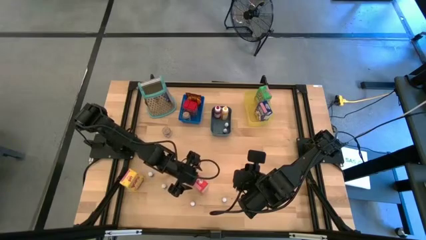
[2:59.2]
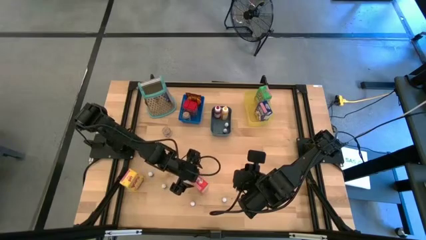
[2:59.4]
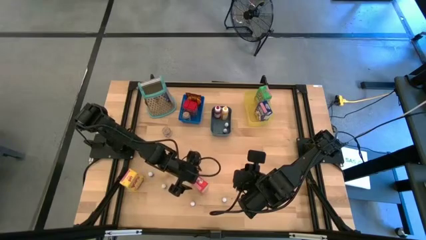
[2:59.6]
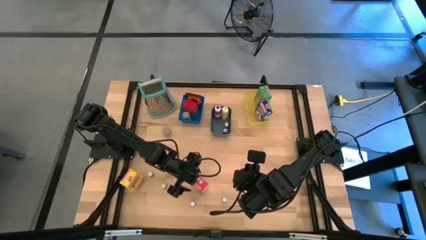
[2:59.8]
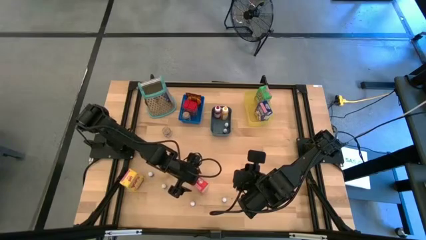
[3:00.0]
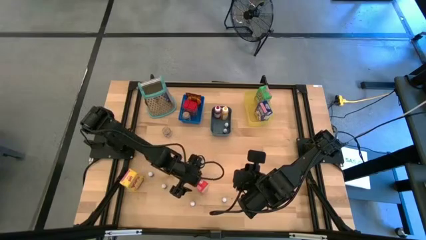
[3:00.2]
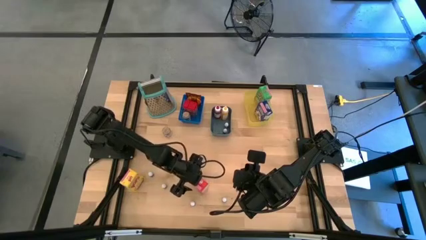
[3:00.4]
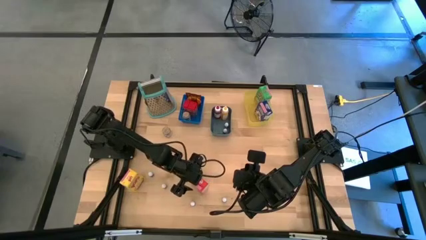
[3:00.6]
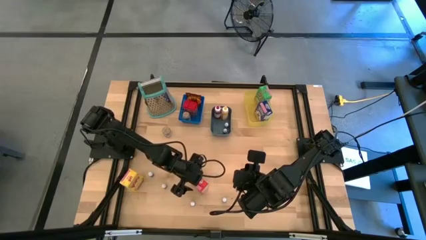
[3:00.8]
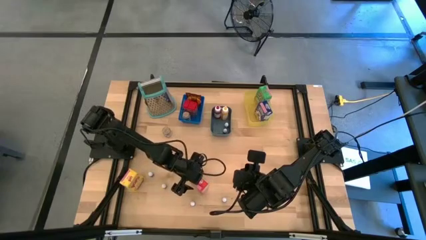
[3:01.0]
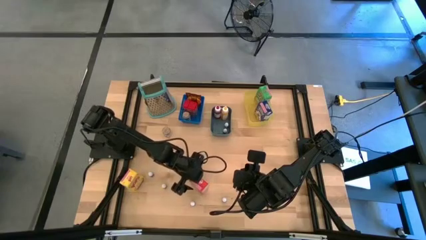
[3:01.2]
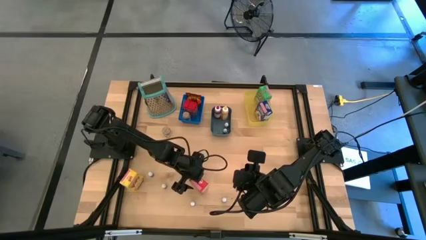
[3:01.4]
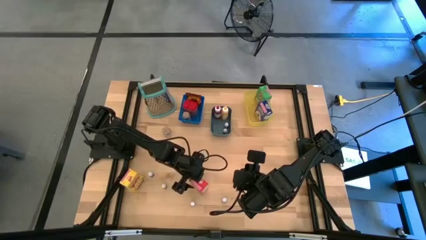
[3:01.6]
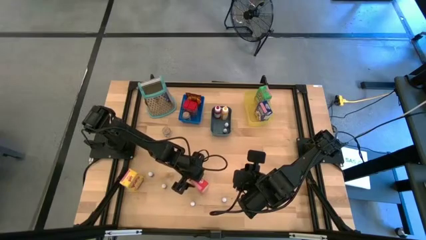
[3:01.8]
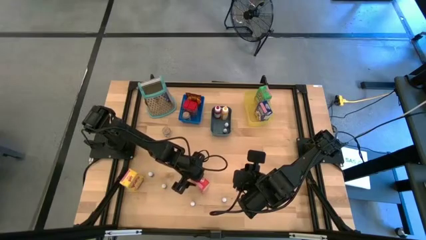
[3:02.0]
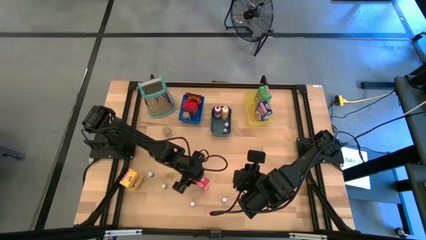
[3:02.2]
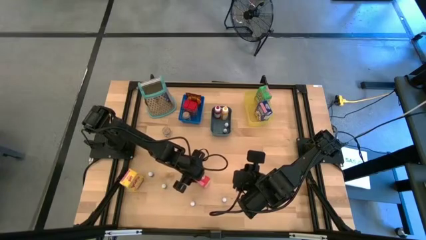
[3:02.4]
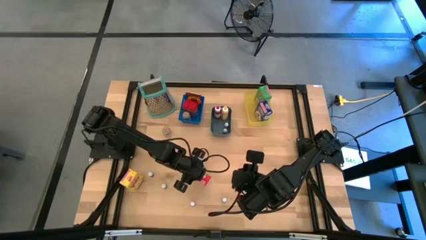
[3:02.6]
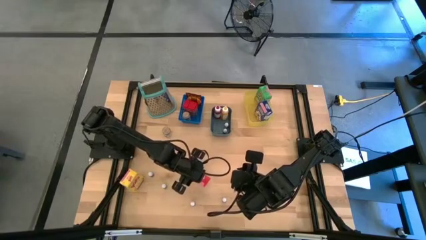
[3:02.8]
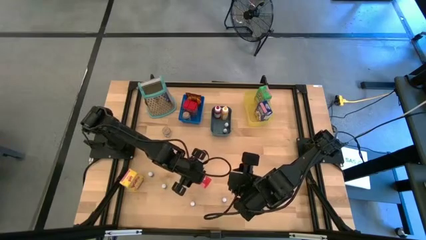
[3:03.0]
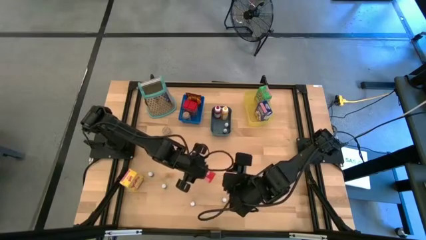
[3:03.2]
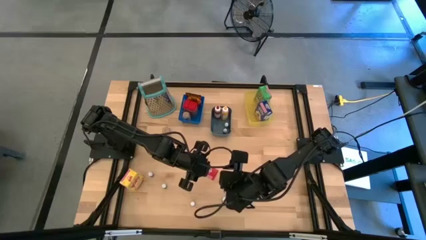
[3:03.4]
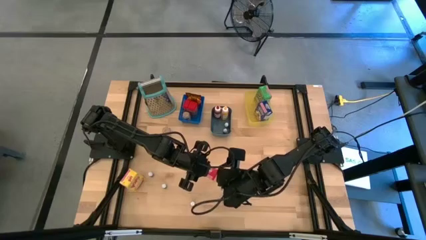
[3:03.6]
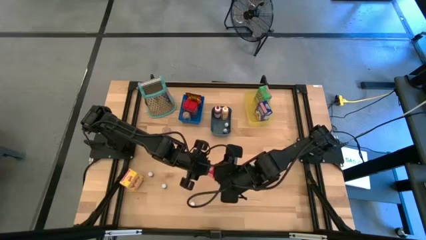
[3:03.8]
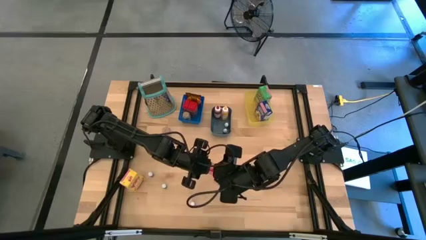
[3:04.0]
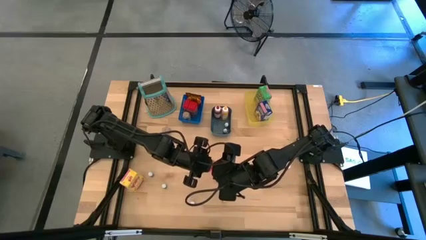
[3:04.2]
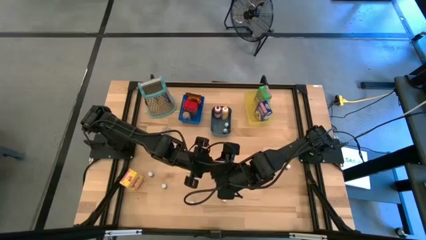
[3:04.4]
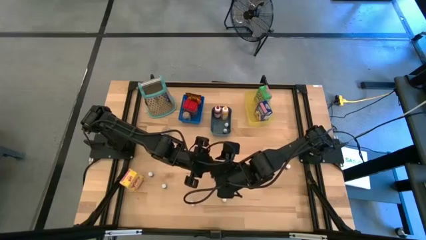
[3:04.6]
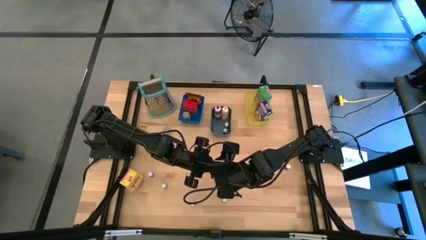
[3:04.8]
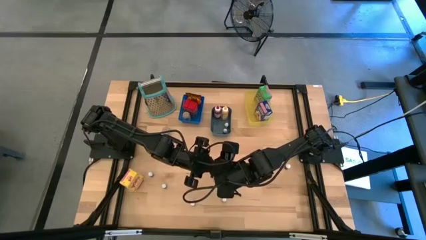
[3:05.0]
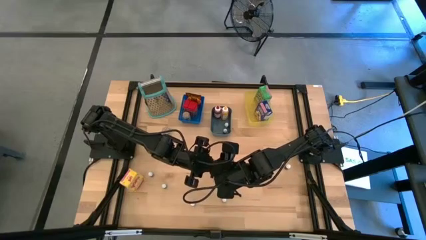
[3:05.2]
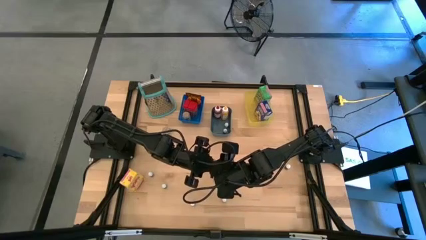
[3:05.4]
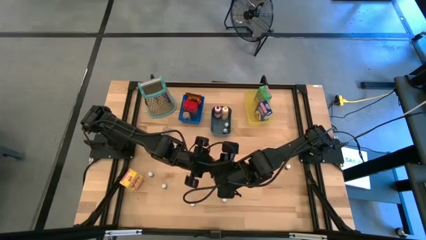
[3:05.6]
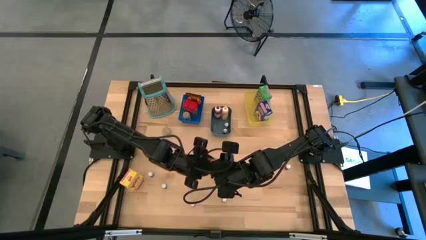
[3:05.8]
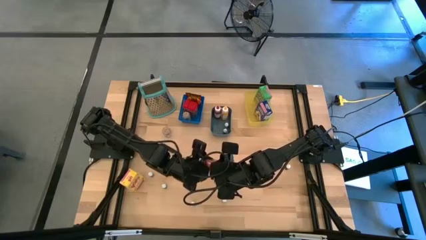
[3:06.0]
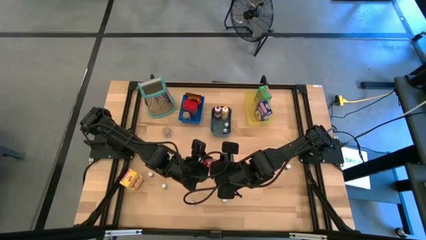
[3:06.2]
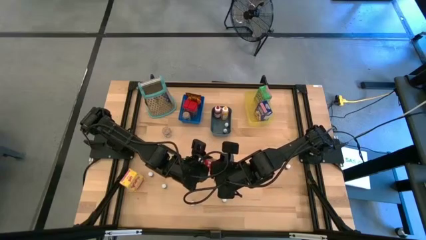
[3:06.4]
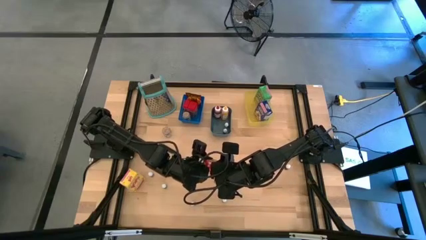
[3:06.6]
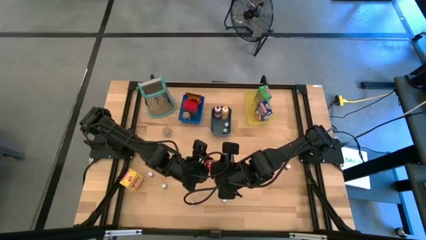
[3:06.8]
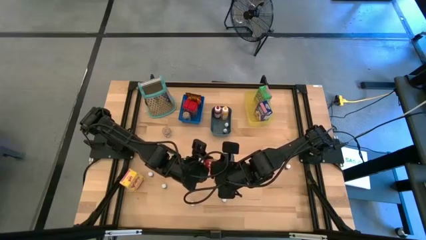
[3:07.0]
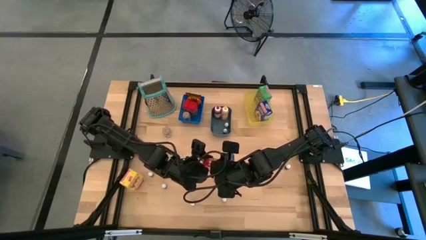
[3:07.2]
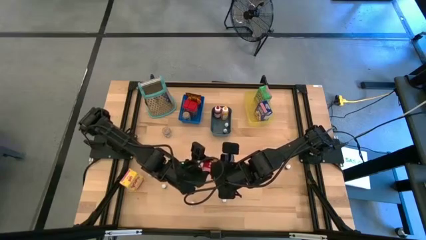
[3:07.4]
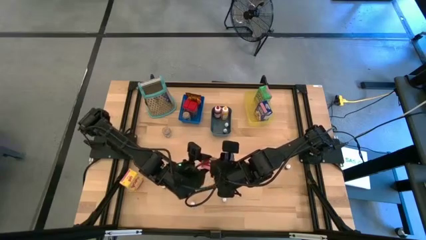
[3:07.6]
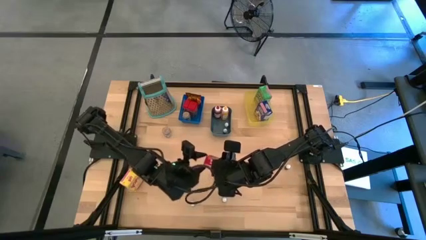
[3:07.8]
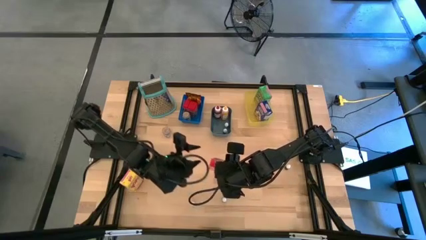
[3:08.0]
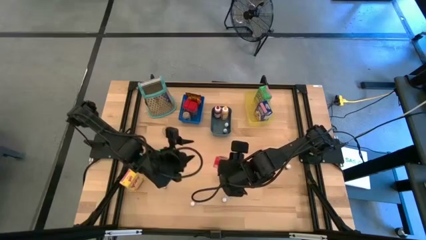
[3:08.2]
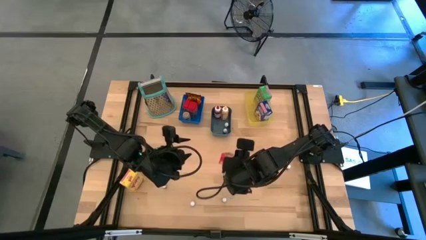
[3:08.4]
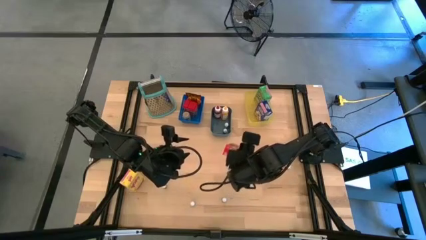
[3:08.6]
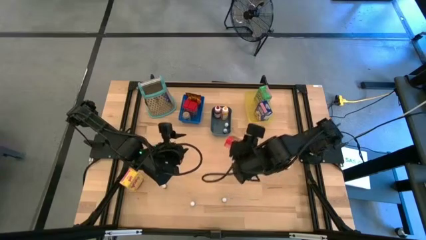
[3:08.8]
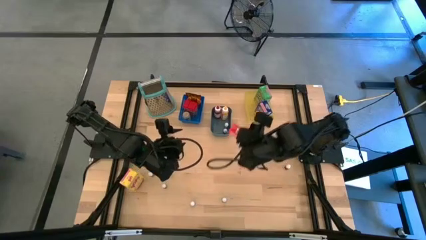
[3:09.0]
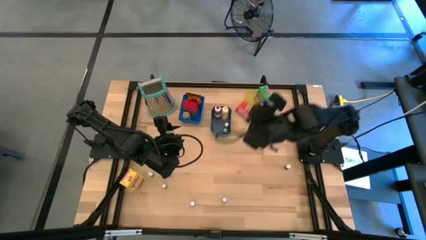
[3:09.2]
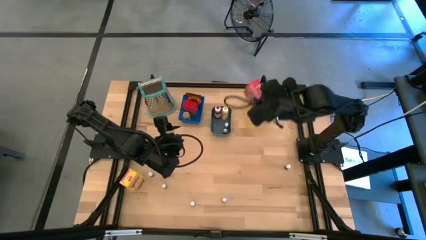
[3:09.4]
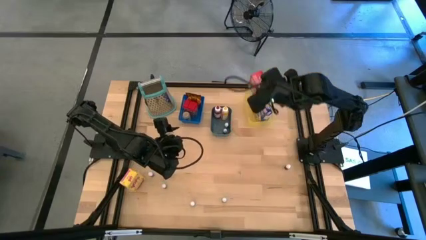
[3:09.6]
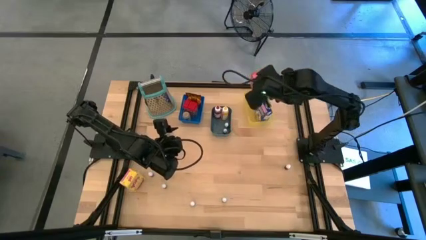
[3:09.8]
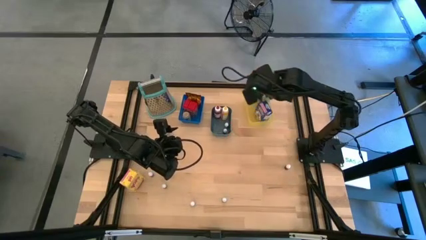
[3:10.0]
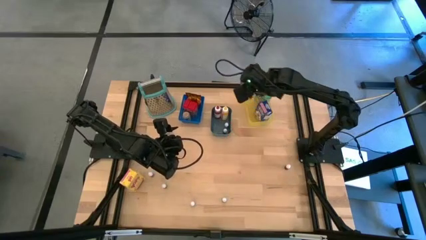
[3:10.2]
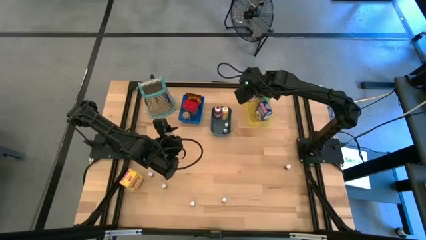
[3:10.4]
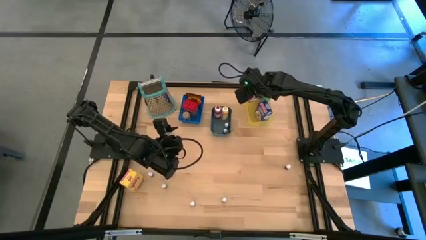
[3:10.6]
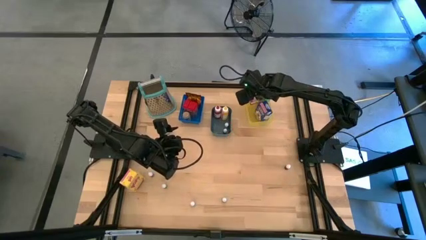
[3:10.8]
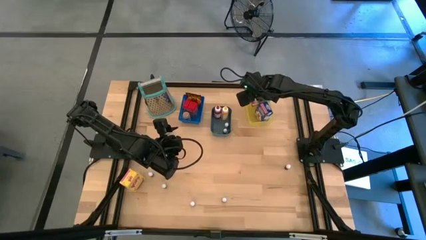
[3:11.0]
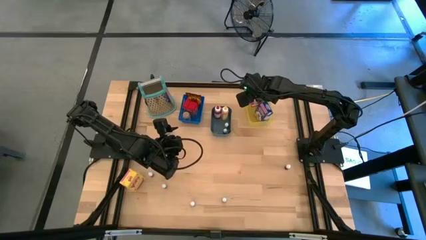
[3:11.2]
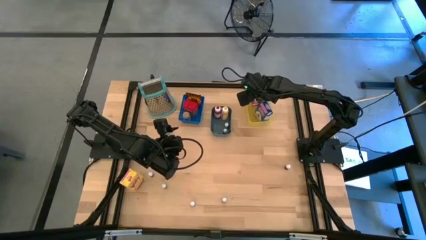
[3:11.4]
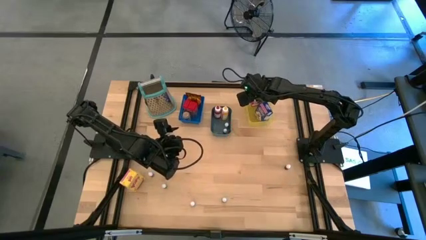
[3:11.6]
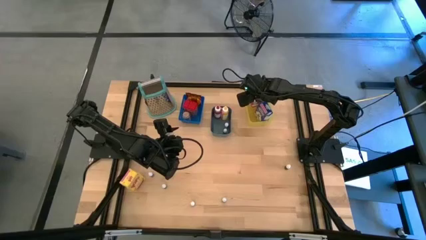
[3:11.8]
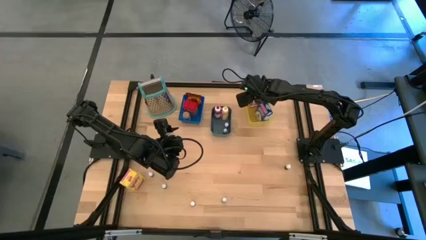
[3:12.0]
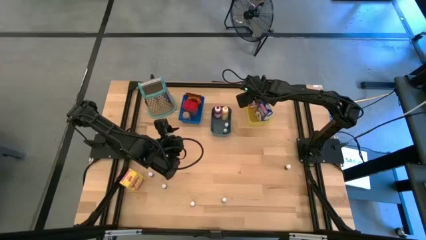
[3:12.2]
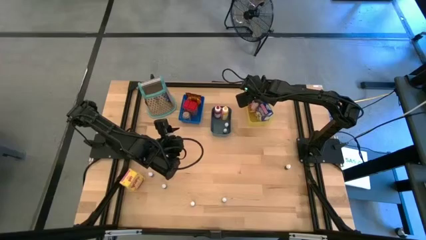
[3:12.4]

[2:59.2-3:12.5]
Task: Pick & Place Kitchen Items
Put the red cereal box into the yellow bin

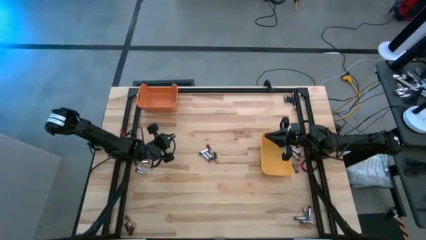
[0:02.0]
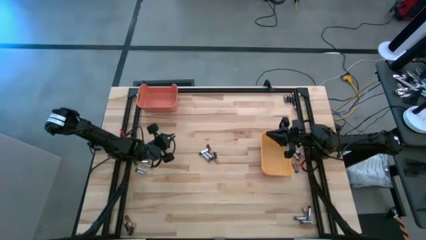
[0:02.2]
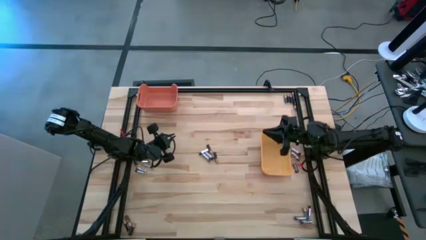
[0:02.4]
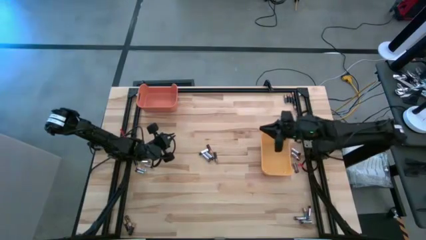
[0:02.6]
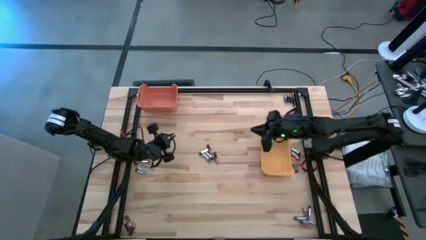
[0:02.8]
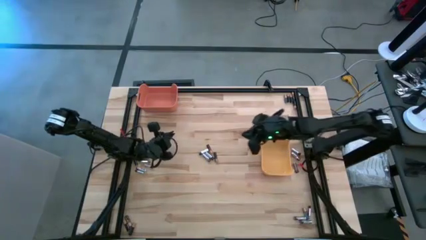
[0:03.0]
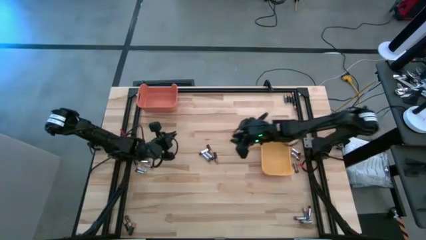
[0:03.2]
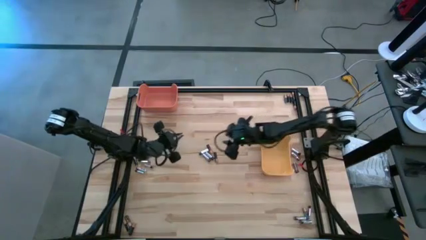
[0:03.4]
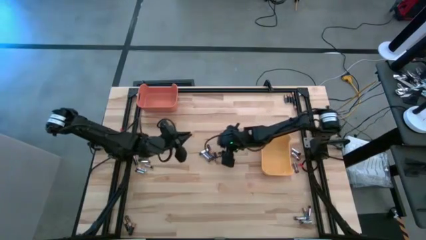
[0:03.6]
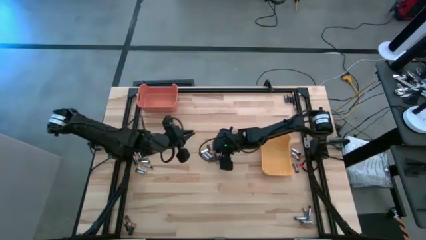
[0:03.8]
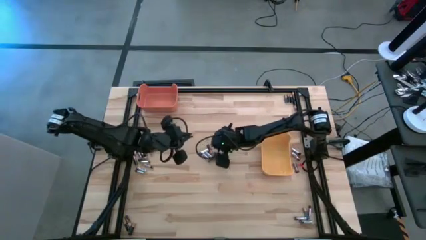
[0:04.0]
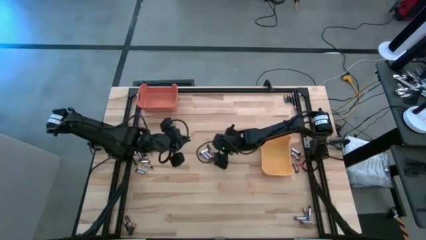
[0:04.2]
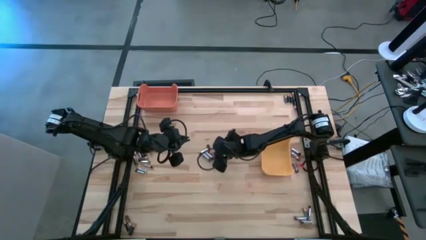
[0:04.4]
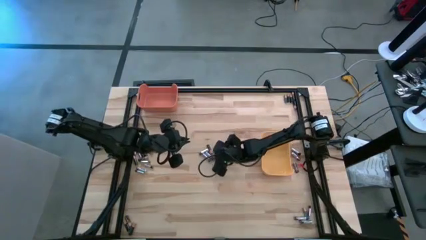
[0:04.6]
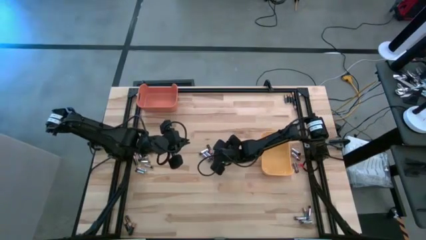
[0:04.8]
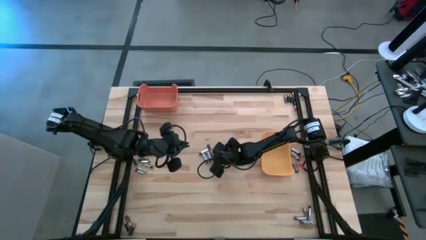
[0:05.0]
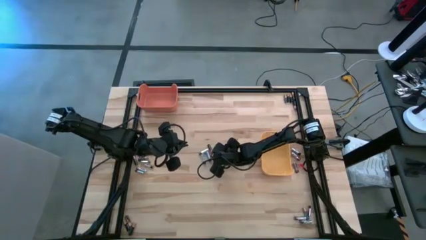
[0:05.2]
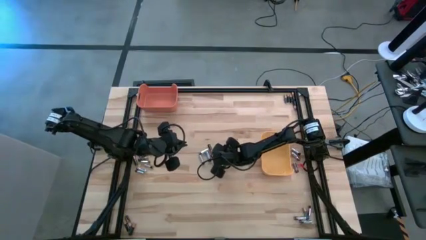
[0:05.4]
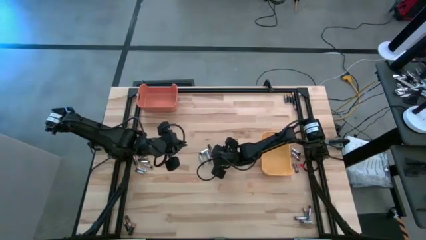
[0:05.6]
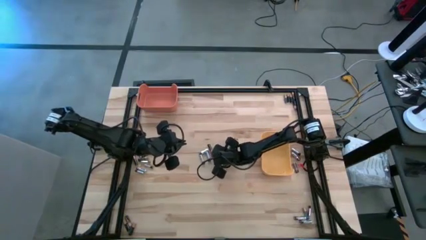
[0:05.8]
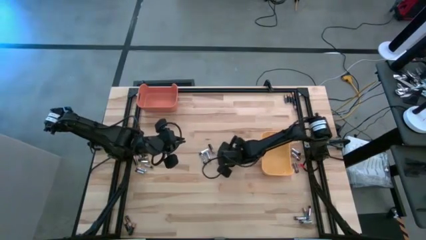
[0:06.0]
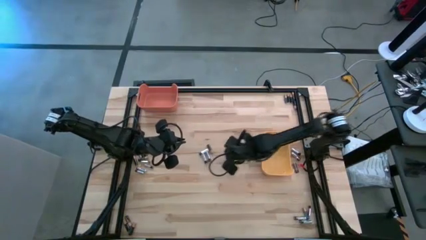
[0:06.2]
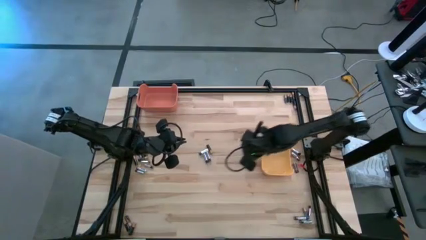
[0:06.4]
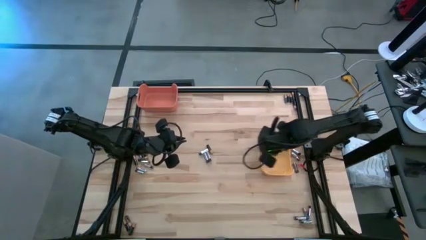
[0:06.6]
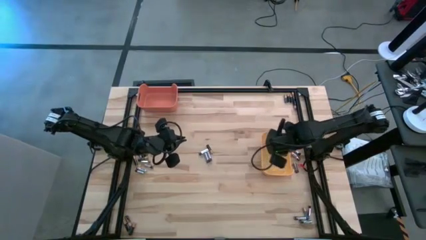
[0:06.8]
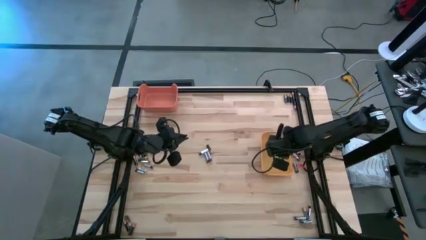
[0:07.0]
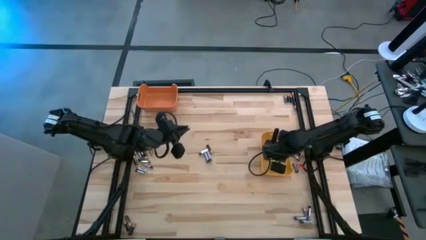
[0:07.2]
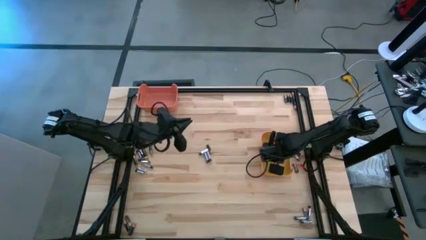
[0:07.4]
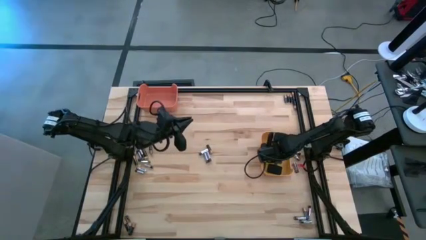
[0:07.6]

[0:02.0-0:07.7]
Task: Sort batteries
Put the black battery into the yellow bin
